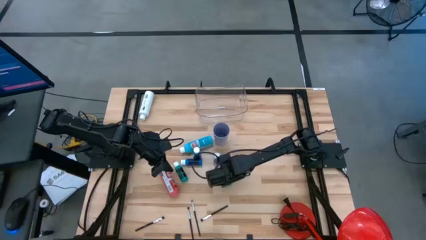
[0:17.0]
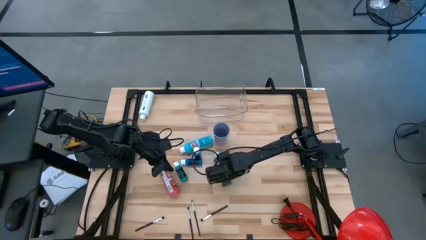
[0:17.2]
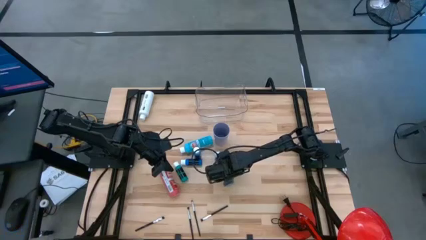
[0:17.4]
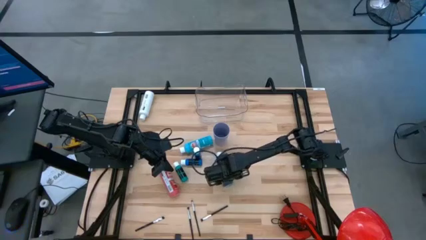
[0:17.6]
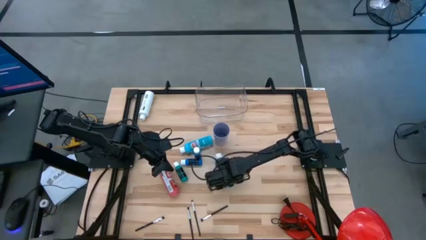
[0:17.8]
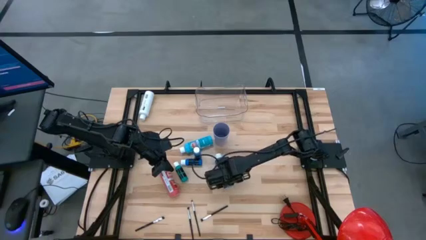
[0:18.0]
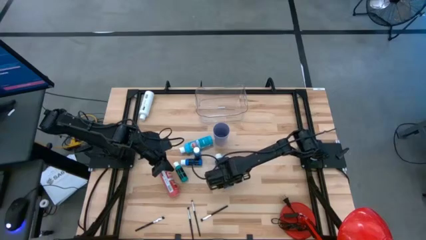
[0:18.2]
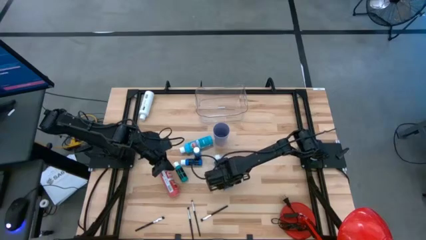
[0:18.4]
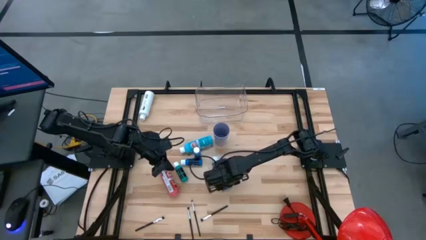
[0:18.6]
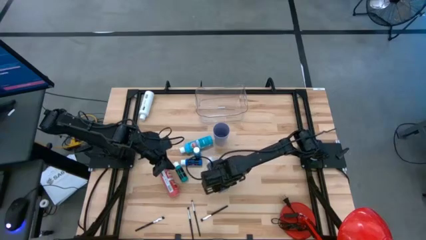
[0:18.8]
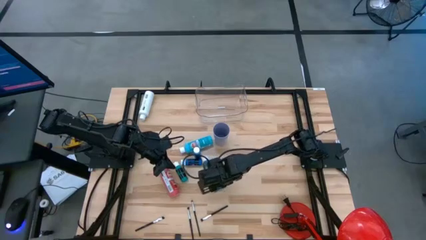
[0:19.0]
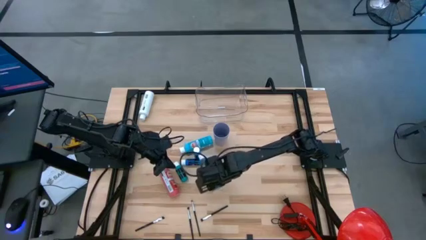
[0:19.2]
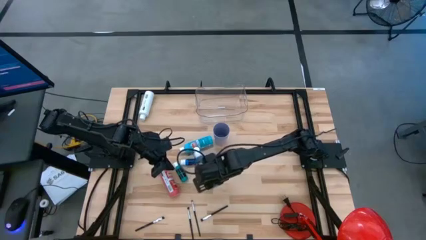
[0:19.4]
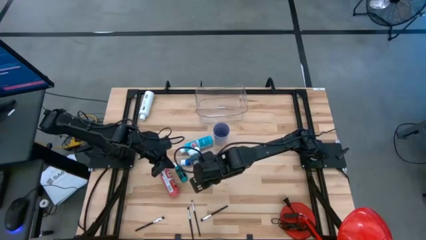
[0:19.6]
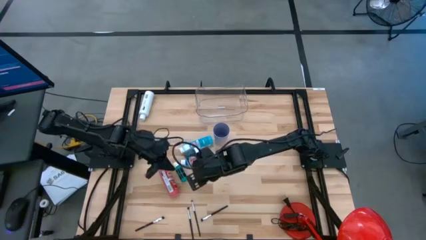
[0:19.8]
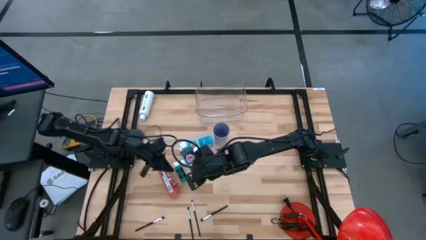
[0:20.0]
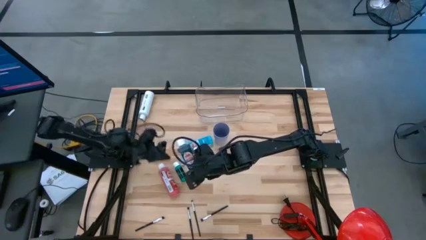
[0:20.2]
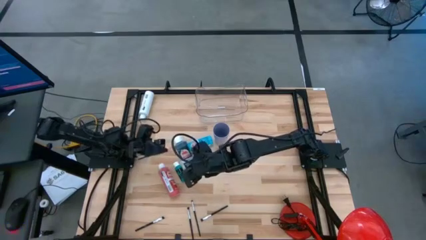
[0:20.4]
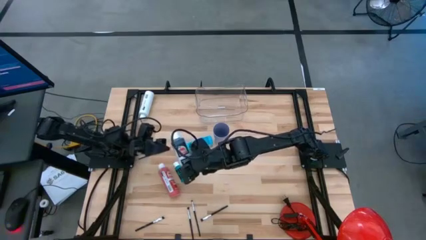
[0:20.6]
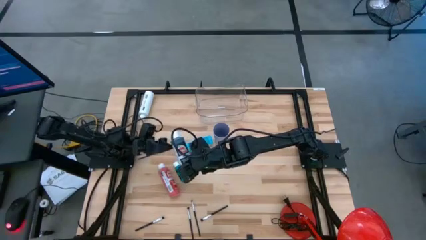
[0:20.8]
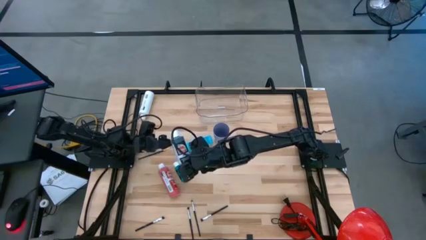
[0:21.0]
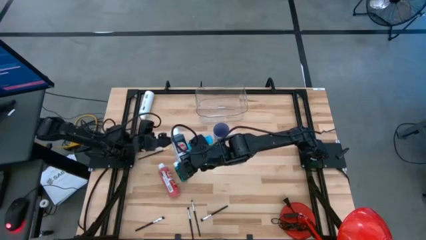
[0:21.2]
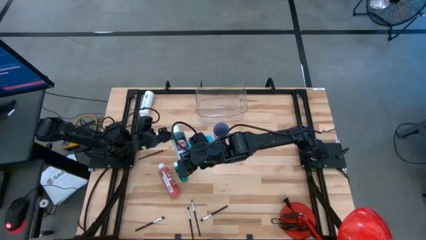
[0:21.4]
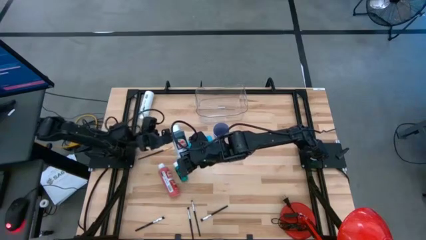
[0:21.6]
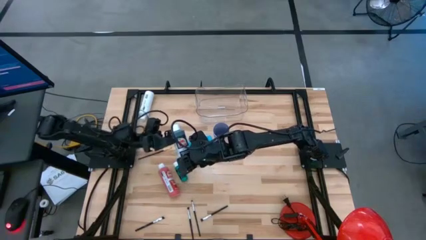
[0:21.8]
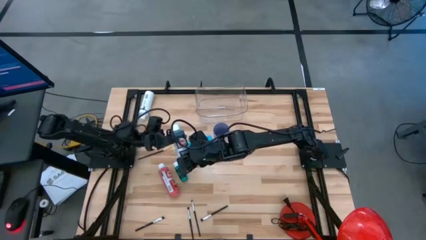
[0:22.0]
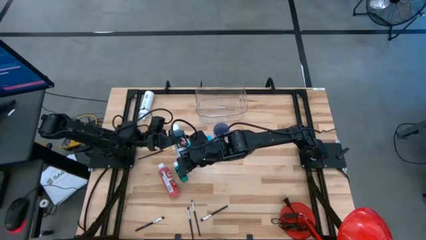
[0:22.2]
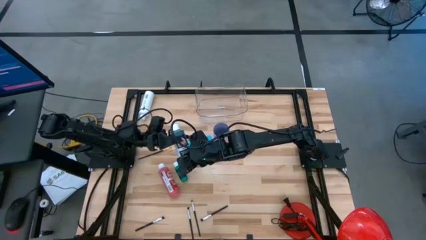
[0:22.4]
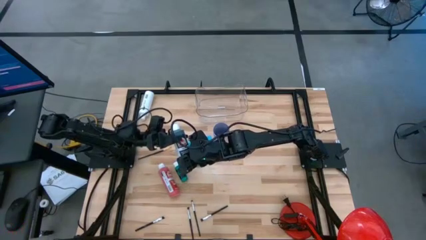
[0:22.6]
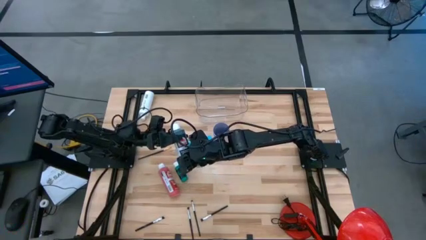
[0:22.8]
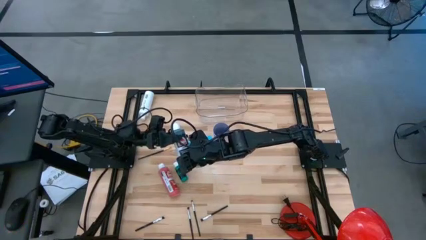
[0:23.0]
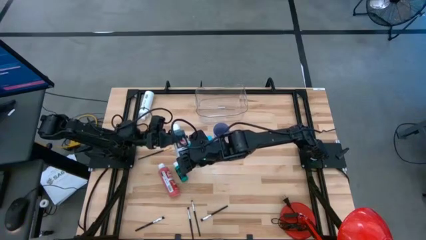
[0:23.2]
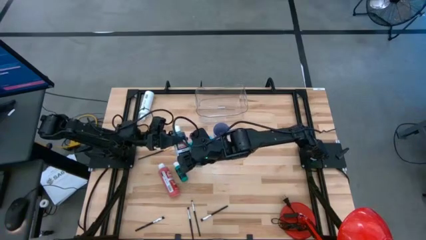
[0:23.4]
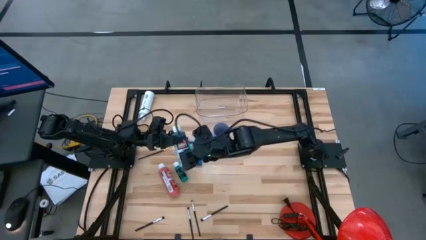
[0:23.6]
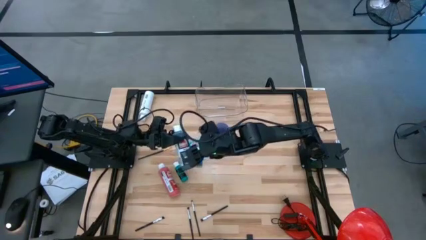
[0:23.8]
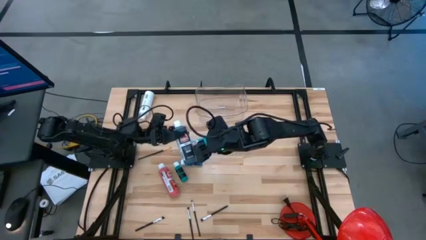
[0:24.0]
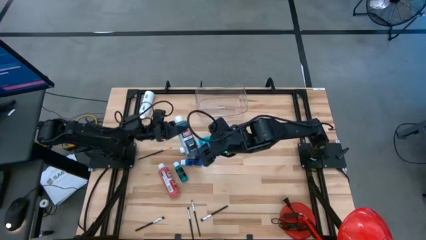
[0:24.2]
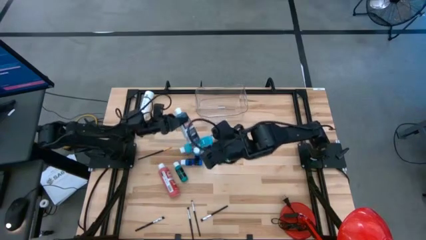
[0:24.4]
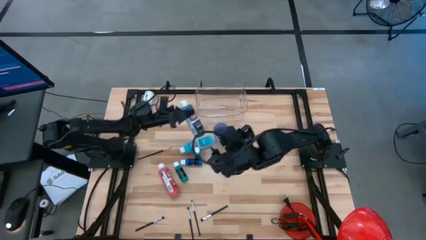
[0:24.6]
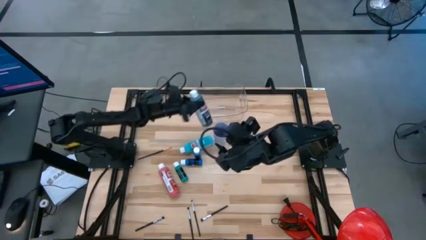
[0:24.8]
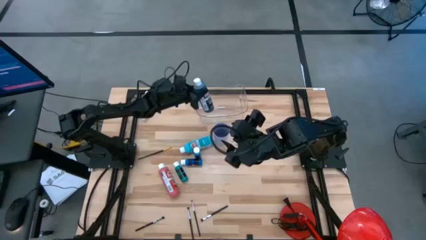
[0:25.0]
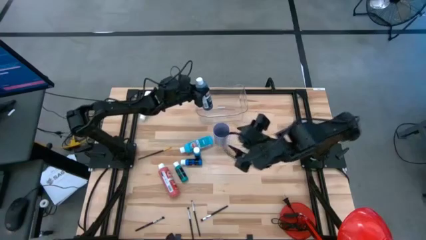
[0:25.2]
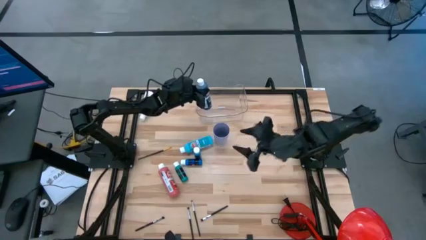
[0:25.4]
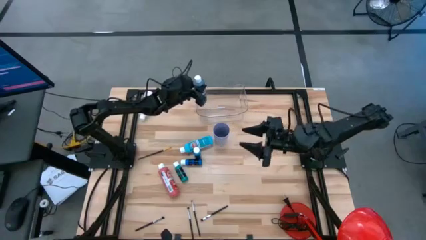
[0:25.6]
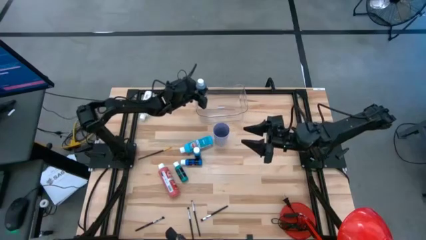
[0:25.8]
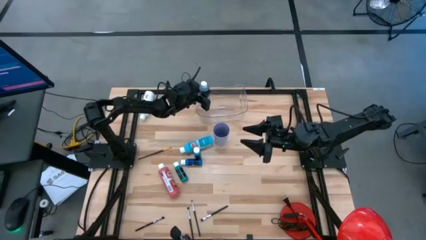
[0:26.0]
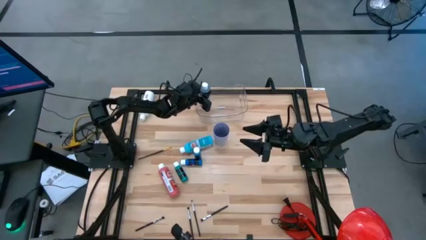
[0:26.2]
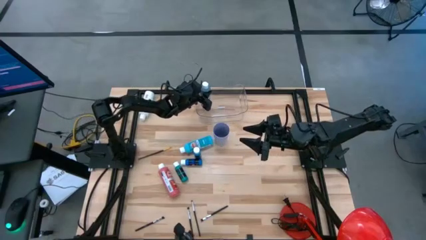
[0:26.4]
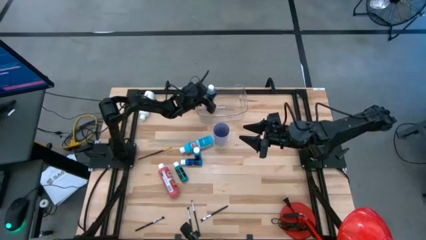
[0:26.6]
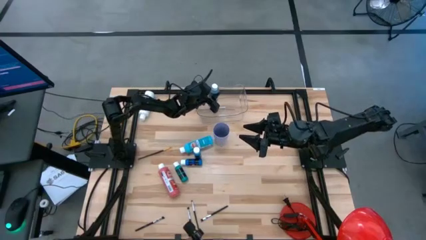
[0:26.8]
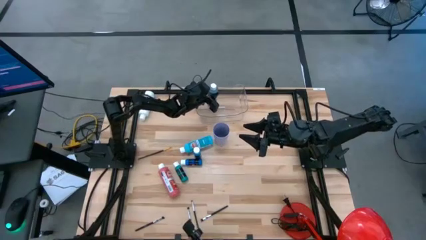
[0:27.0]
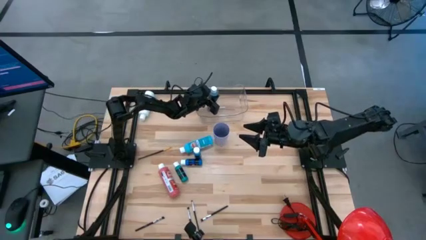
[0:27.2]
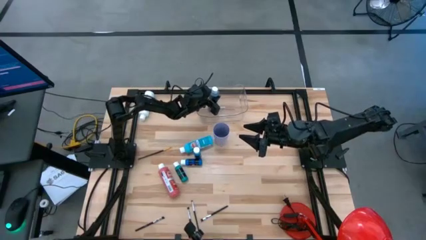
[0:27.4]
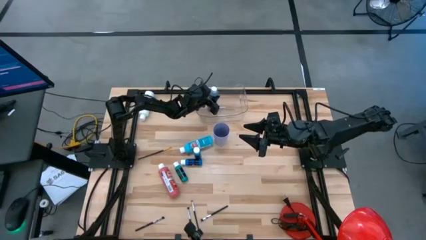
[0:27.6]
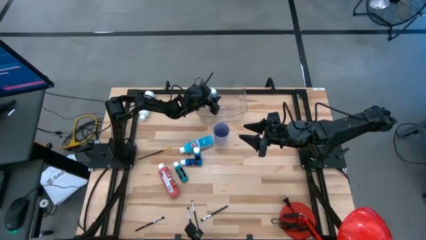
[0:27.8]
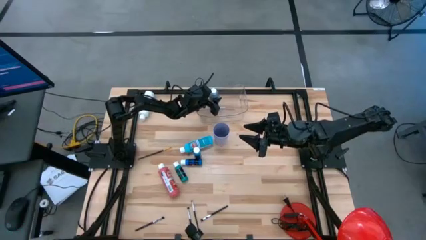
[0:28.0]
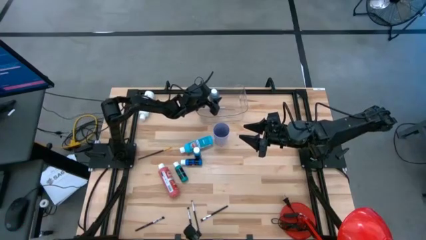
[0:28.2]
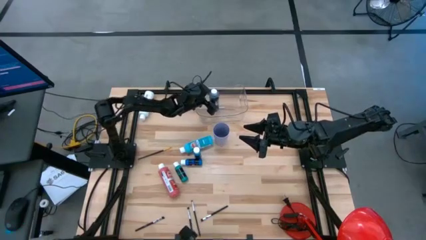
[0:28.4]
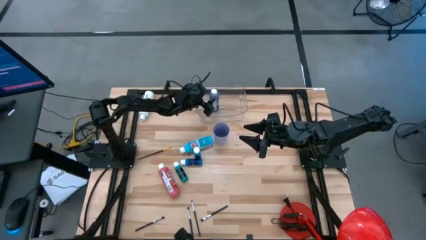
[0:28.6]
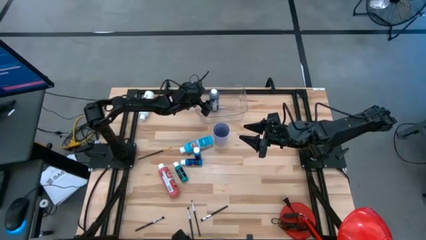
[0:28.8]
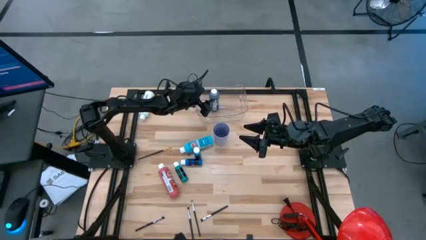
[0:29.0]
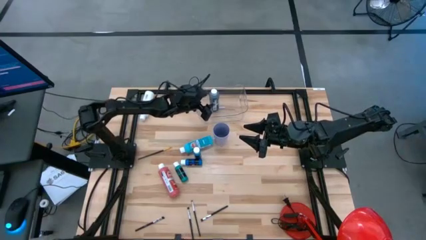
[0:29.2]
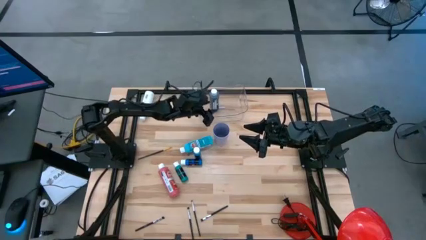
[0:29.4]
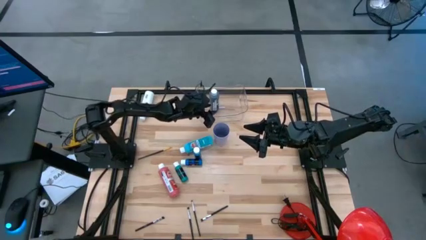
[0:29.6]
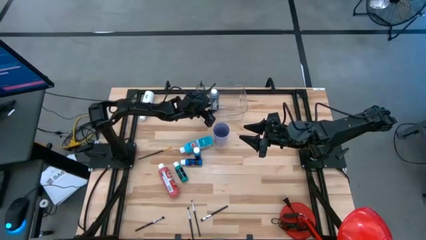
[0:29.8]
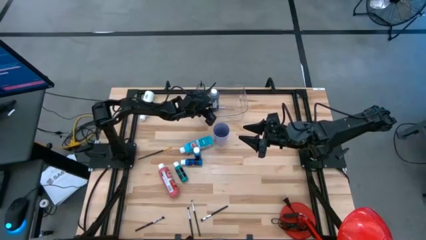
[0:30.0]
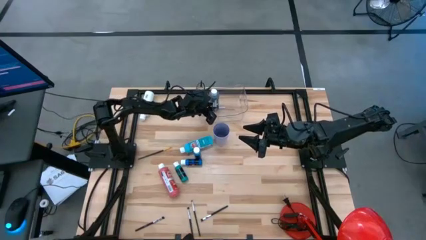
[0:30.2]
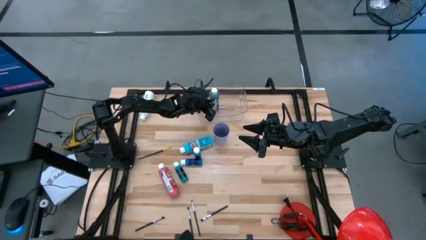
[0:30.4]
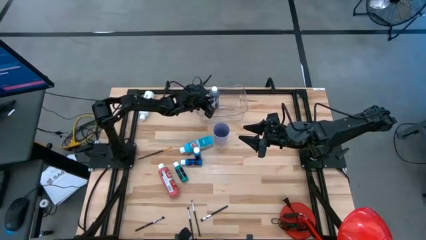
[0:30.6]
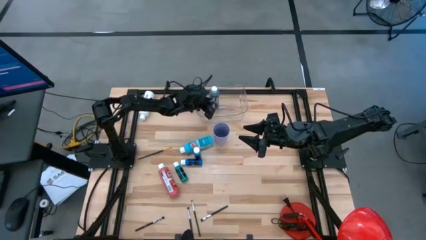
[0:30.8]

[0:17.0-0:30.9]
Task: Pick & Place Paint Supplies
Put the black paint bottle into the transparent bin
